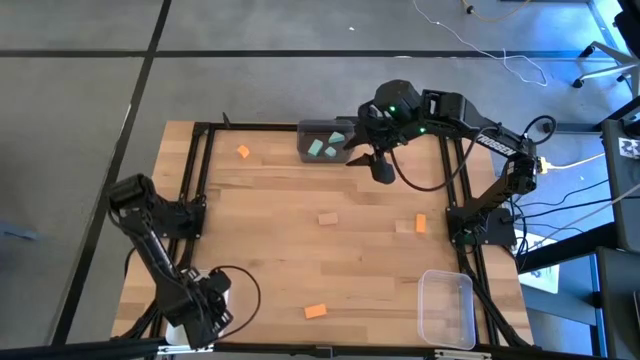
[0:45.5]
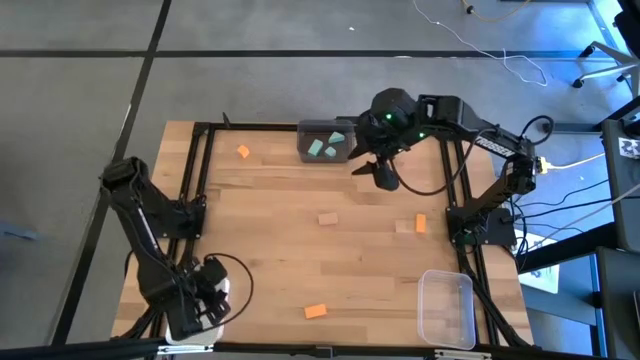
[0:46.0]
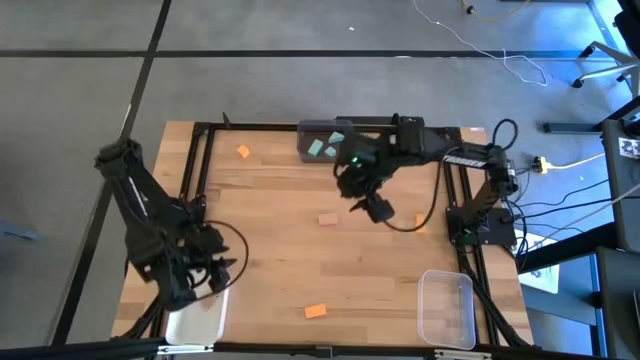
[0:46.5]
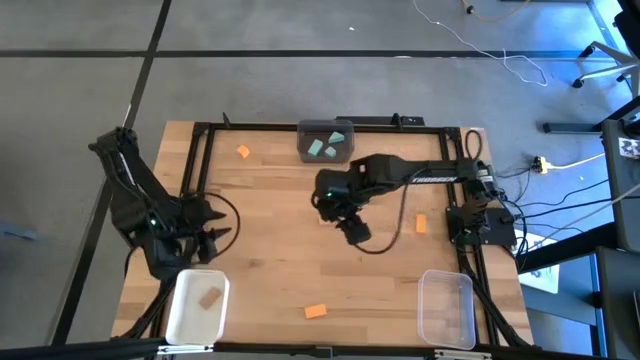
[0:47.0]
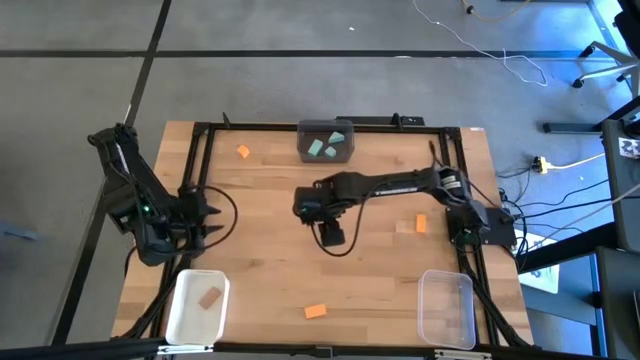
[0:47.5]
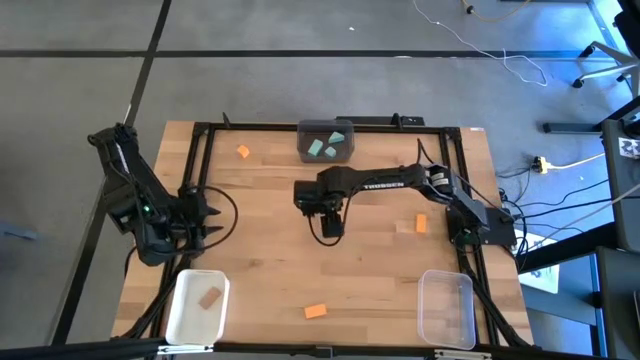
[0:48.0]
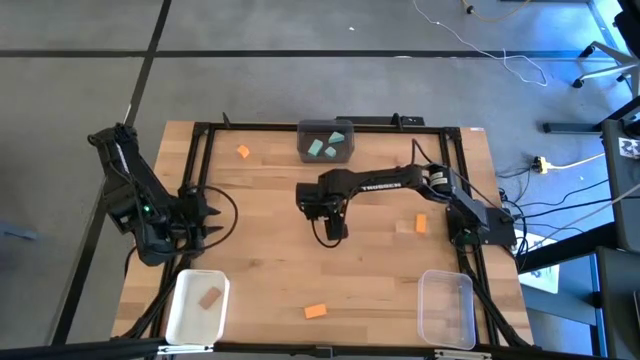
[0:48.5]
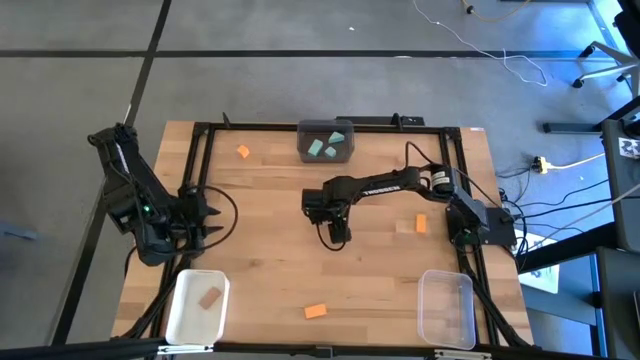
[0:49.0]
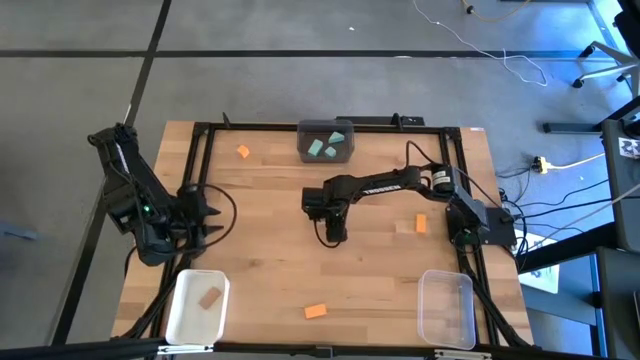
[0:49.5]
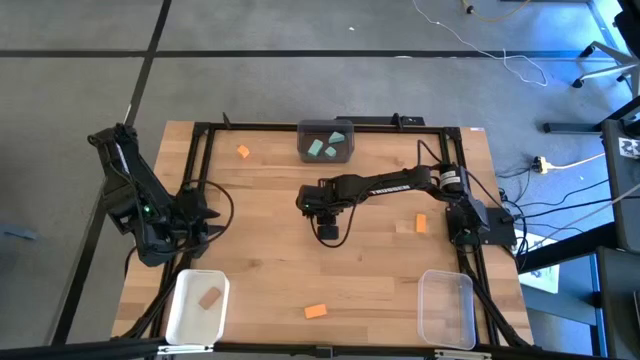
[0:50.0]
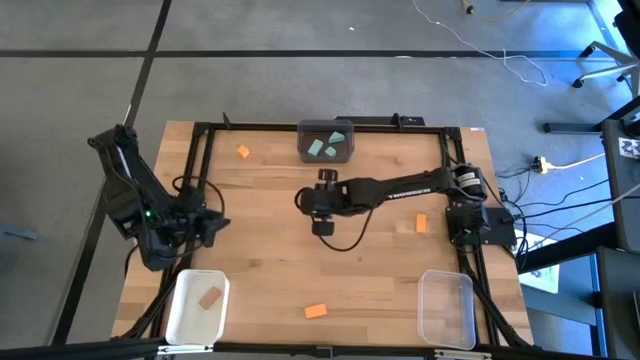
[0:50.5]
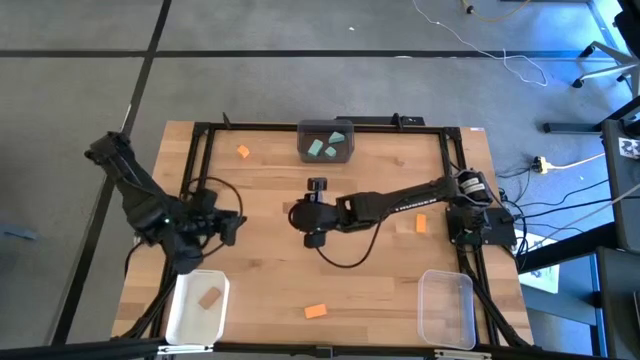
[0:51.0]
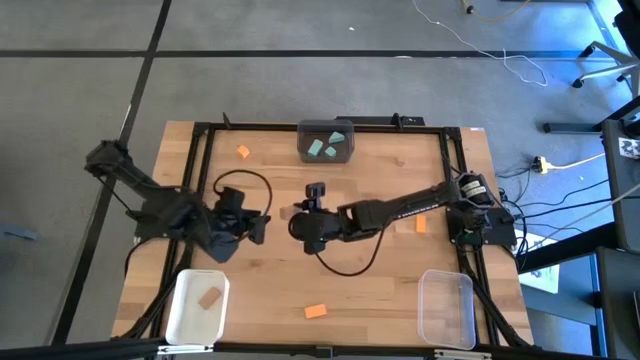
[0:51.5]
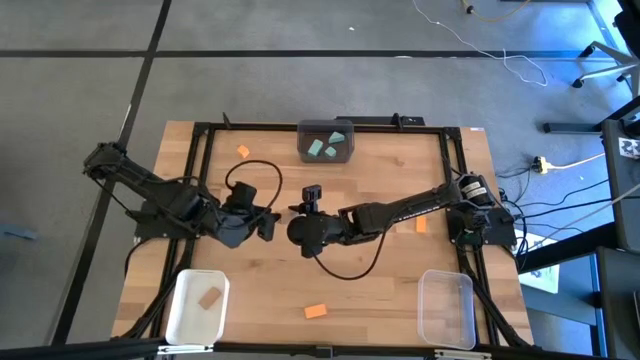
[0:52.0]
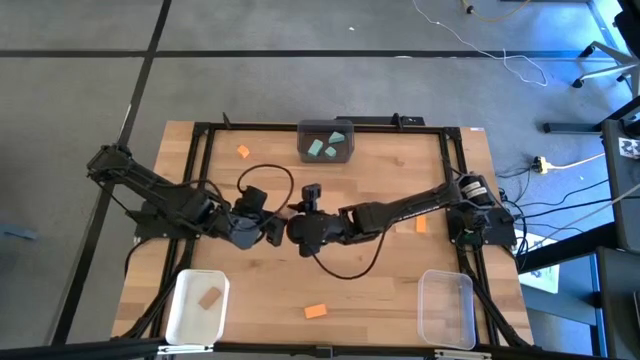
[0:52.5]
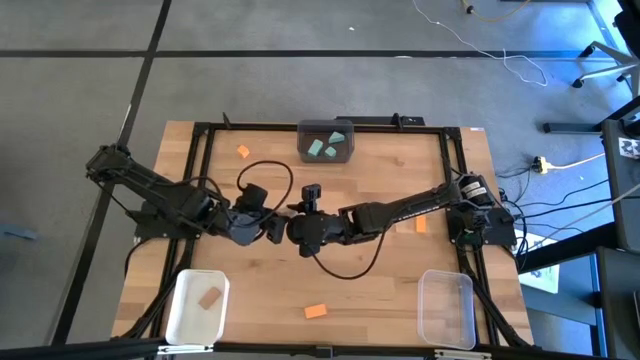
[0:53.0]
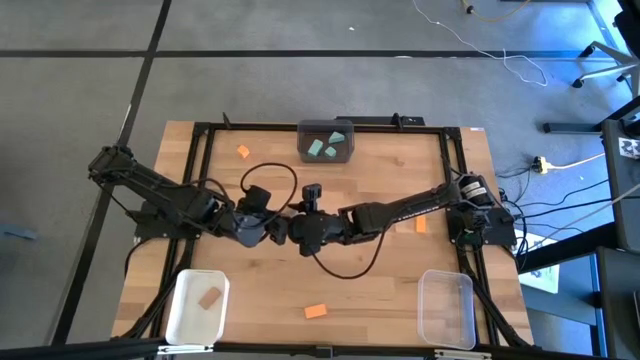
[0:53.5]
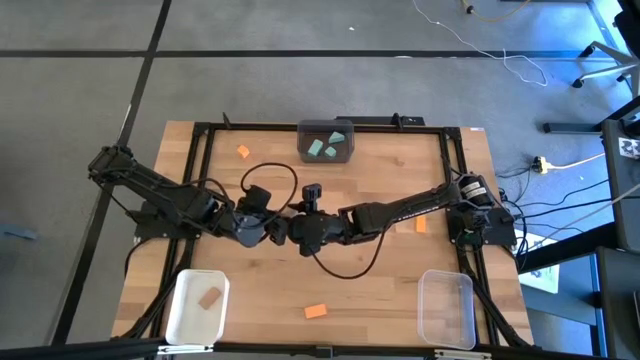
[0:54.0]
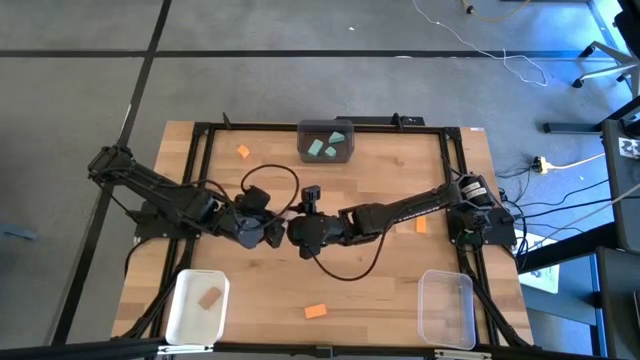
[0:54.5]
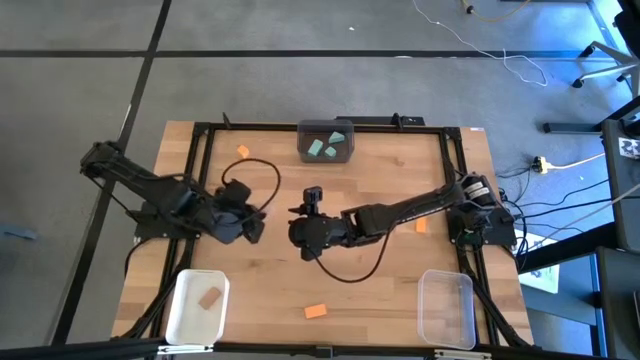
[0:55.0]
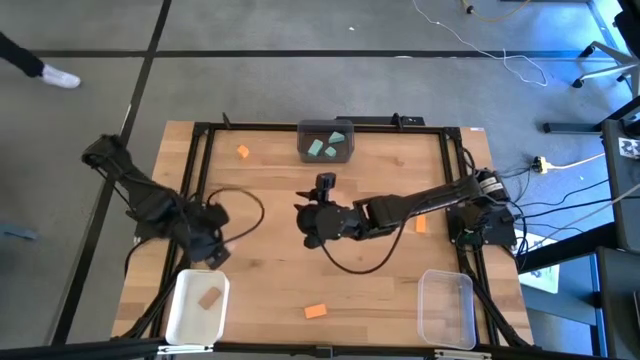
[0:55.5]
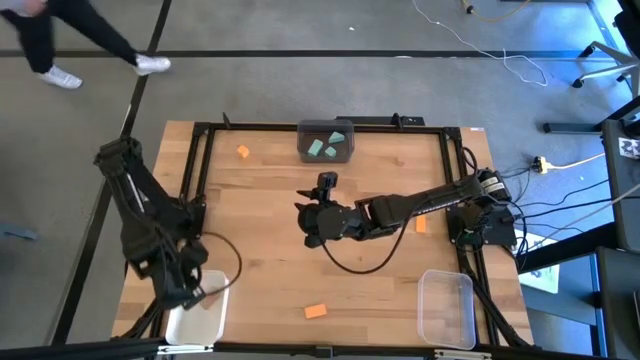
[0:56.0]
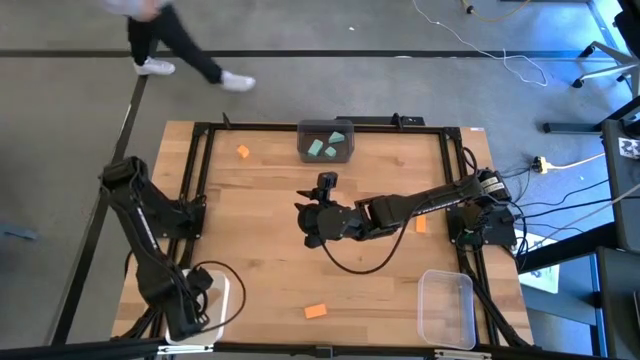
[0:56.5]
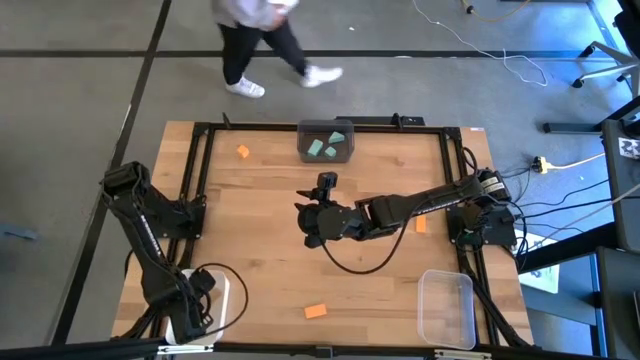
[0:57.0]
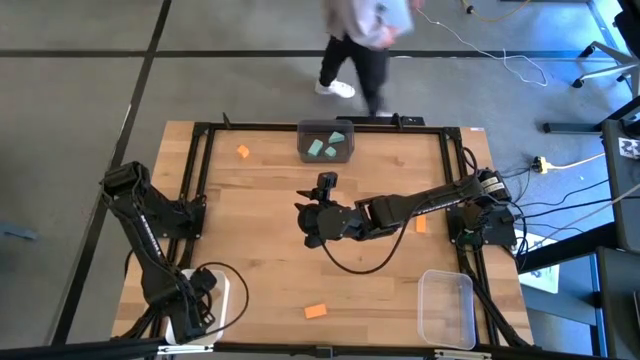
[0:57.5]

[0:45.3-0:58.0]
Task: Sort & place blocks by color
Put the bottom brown block into the white bin
